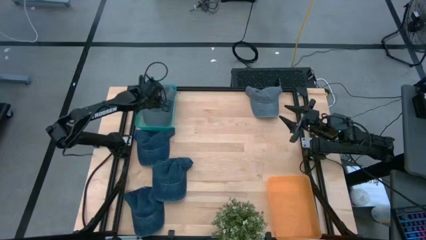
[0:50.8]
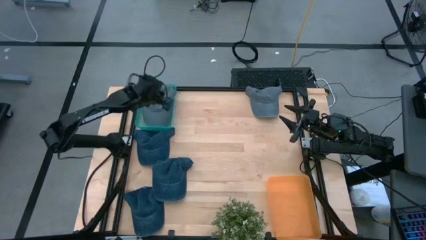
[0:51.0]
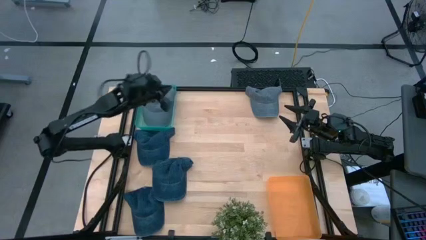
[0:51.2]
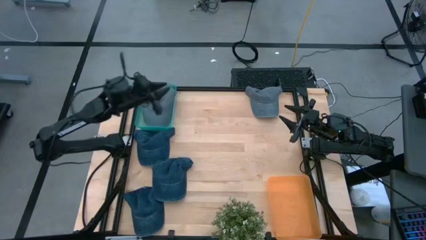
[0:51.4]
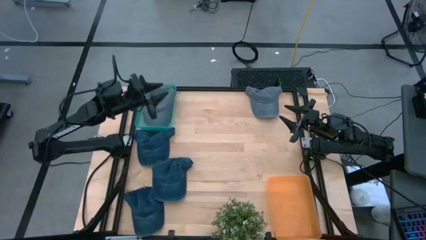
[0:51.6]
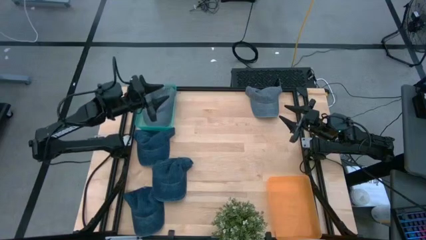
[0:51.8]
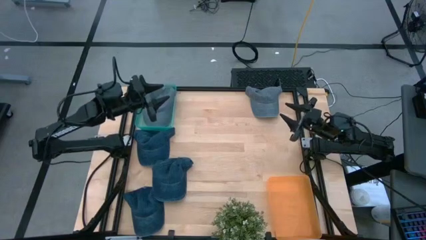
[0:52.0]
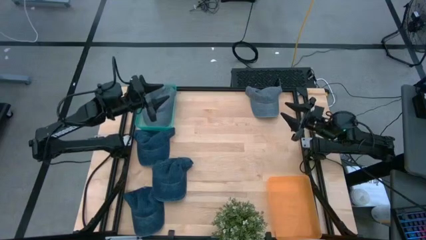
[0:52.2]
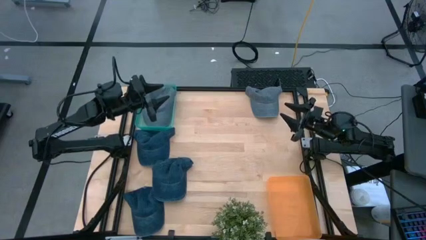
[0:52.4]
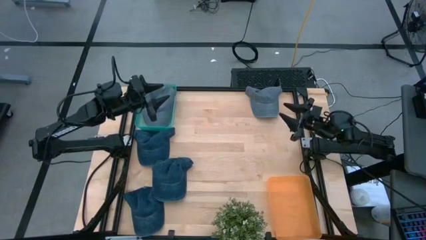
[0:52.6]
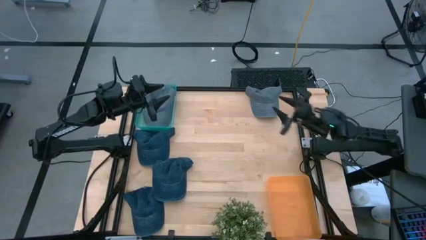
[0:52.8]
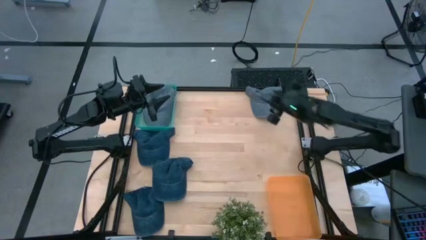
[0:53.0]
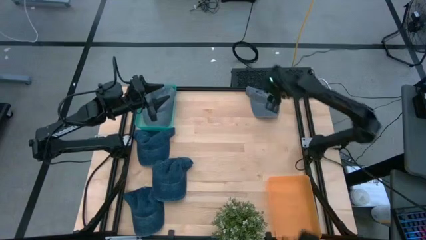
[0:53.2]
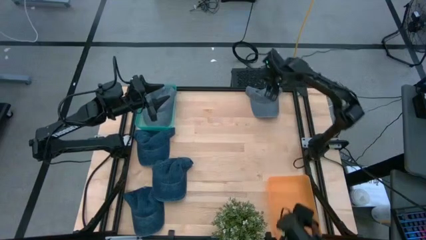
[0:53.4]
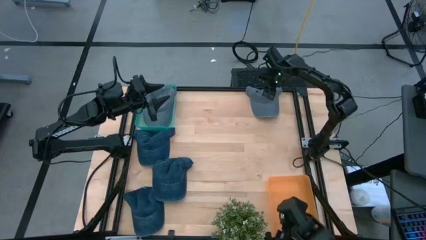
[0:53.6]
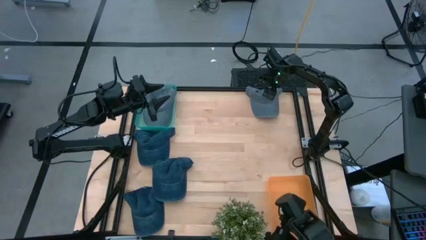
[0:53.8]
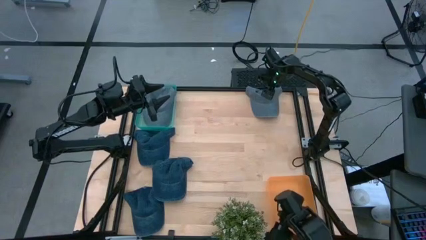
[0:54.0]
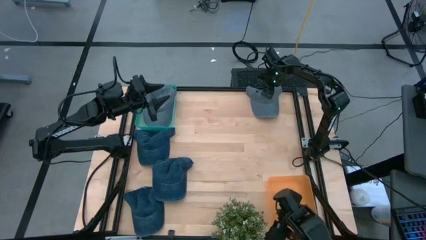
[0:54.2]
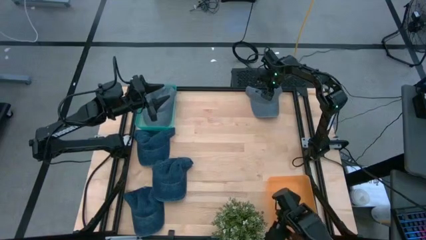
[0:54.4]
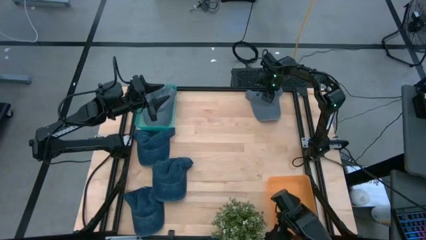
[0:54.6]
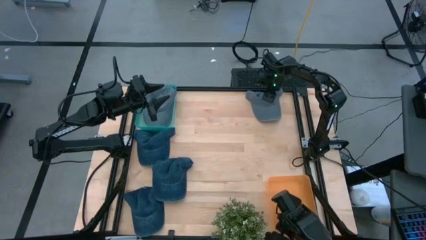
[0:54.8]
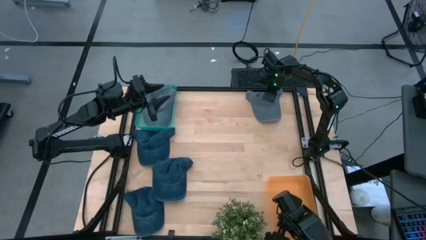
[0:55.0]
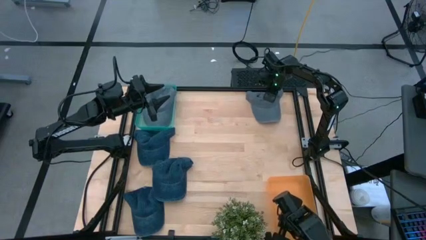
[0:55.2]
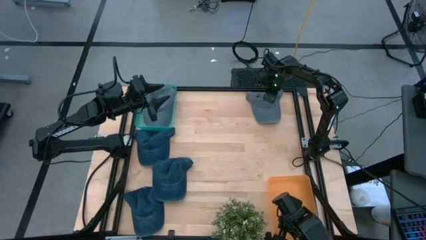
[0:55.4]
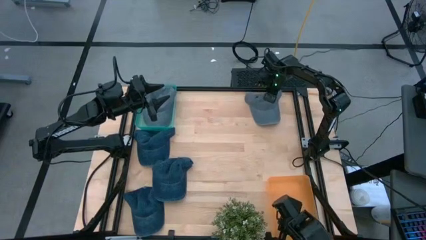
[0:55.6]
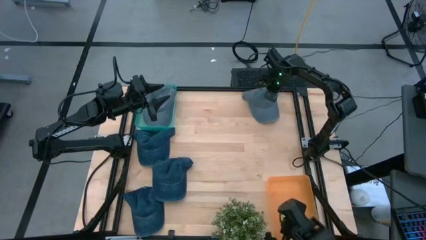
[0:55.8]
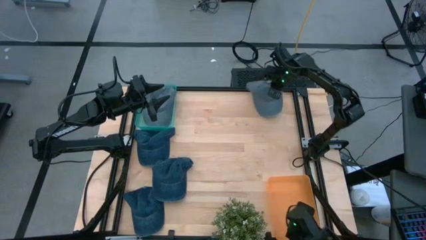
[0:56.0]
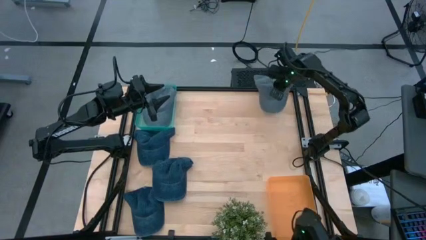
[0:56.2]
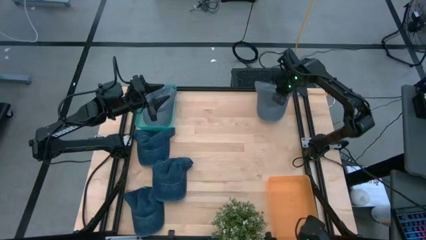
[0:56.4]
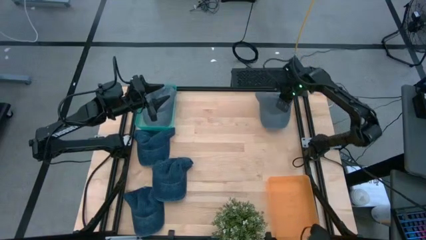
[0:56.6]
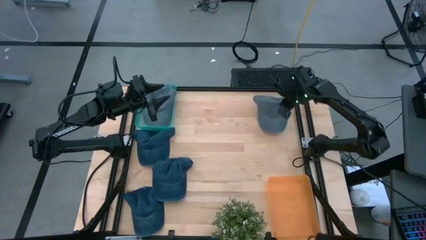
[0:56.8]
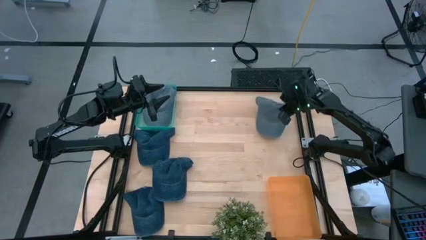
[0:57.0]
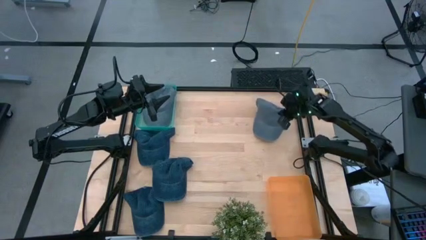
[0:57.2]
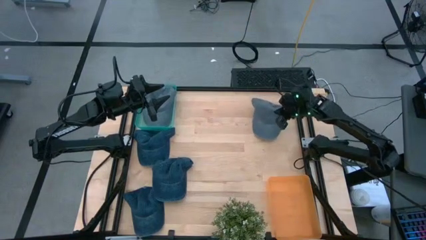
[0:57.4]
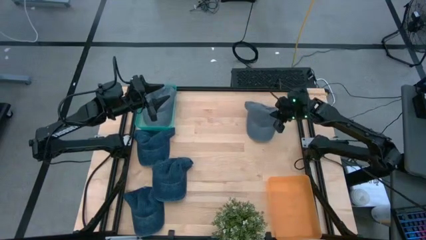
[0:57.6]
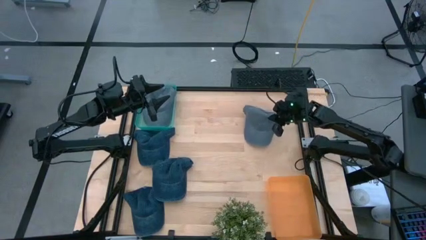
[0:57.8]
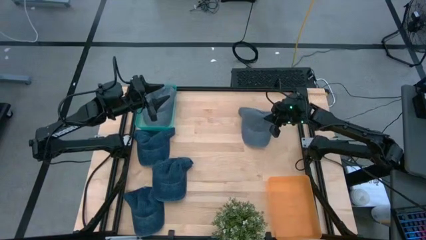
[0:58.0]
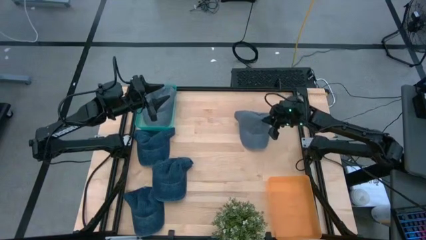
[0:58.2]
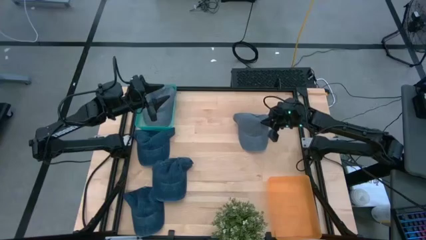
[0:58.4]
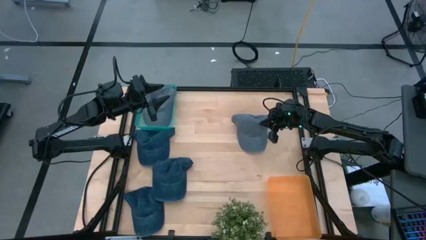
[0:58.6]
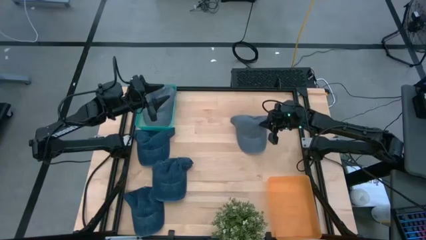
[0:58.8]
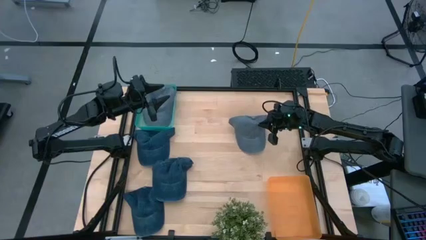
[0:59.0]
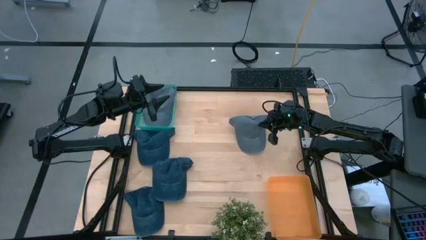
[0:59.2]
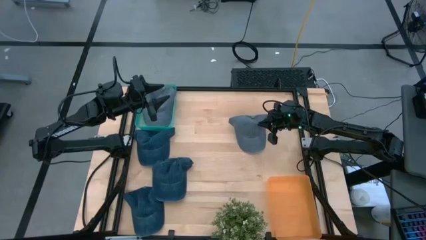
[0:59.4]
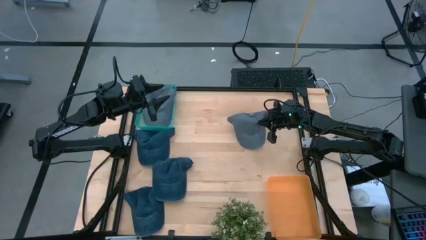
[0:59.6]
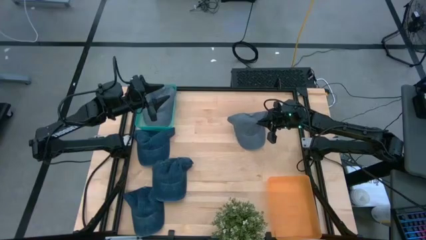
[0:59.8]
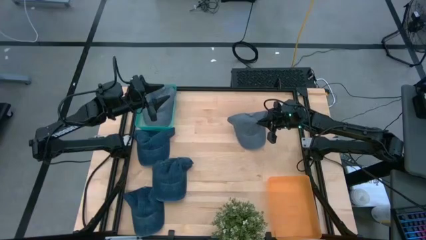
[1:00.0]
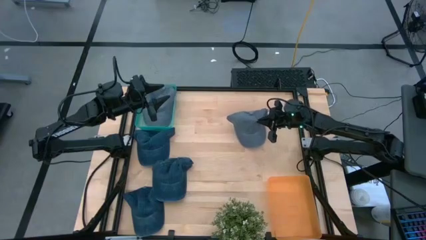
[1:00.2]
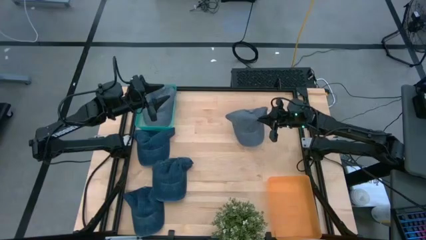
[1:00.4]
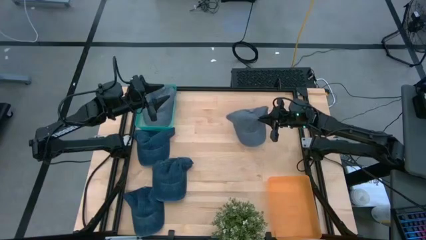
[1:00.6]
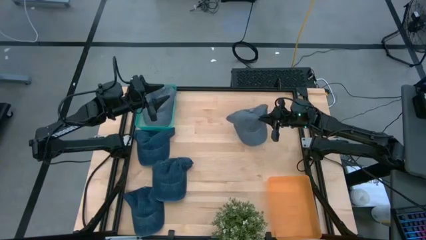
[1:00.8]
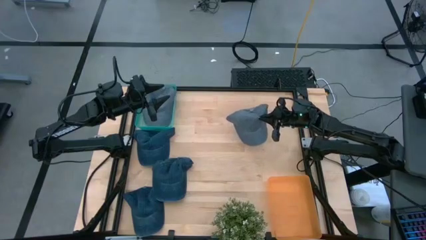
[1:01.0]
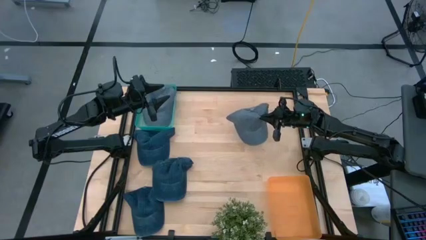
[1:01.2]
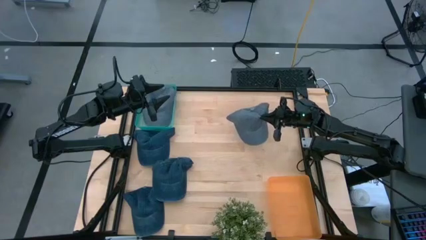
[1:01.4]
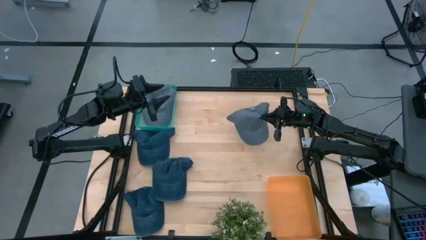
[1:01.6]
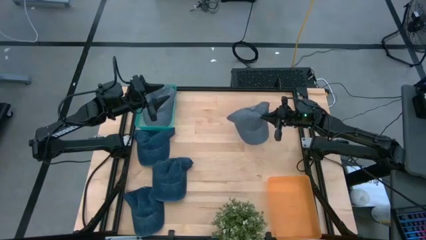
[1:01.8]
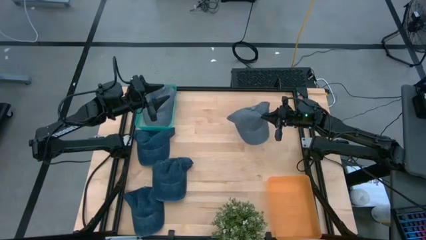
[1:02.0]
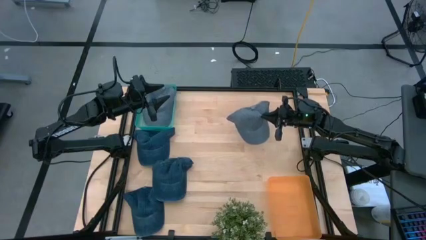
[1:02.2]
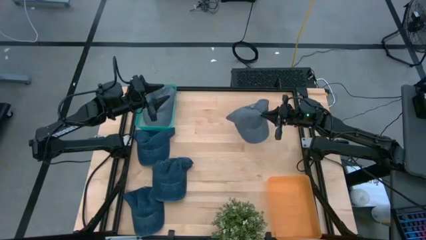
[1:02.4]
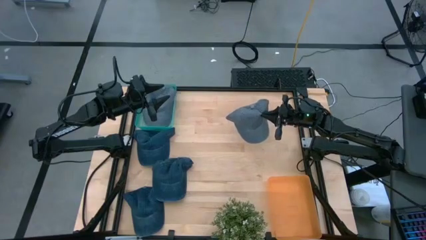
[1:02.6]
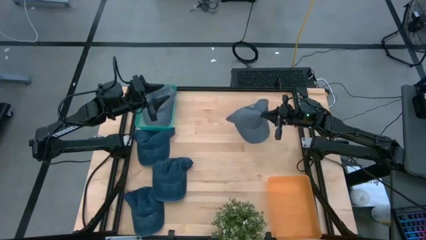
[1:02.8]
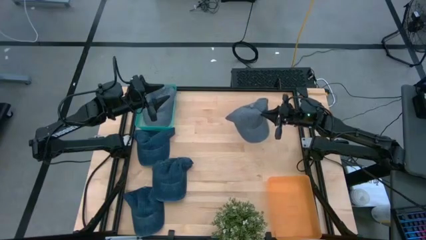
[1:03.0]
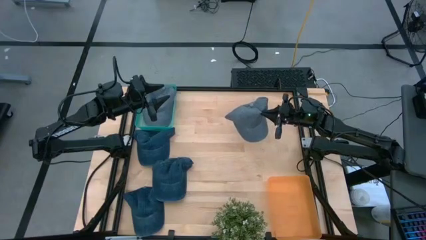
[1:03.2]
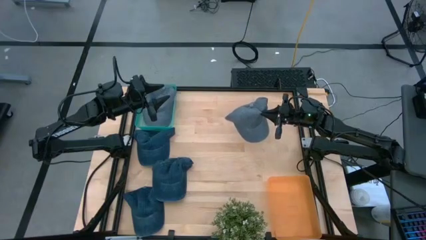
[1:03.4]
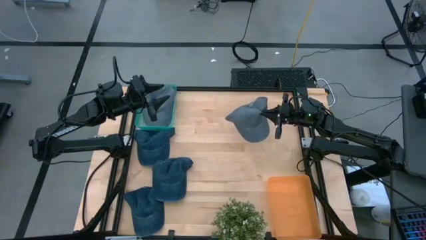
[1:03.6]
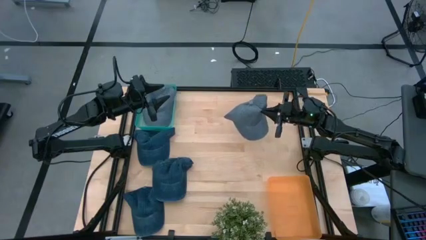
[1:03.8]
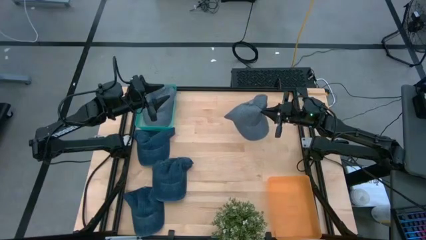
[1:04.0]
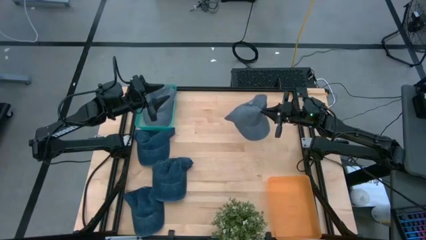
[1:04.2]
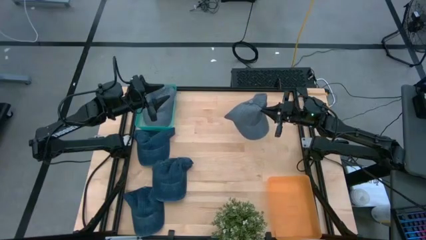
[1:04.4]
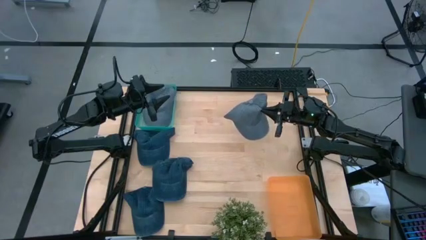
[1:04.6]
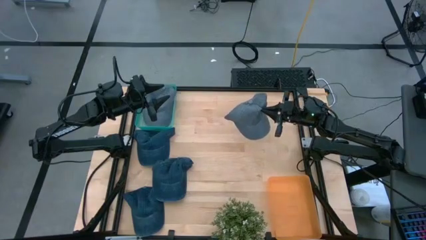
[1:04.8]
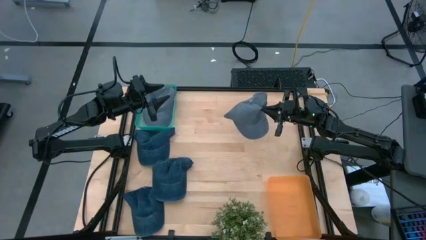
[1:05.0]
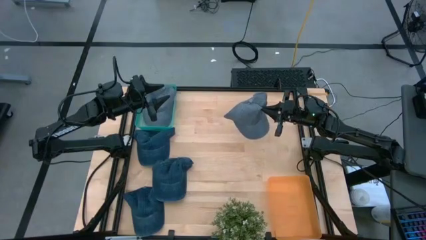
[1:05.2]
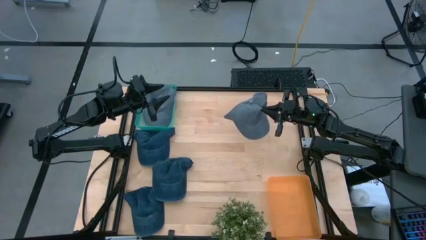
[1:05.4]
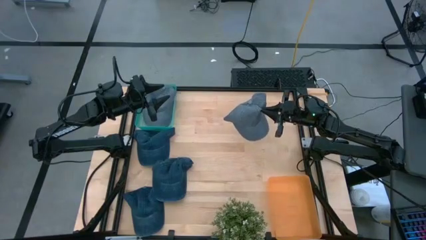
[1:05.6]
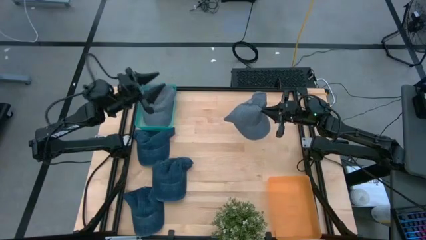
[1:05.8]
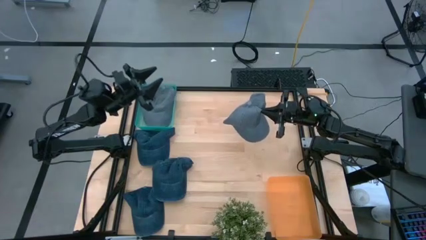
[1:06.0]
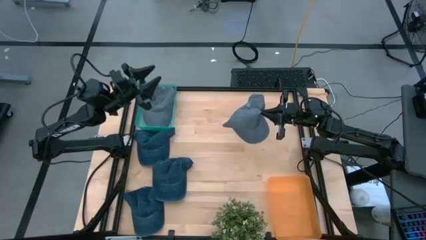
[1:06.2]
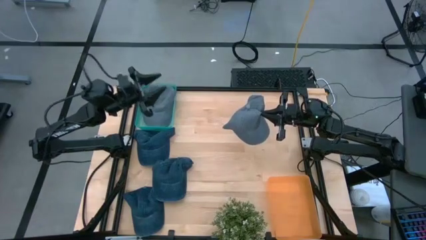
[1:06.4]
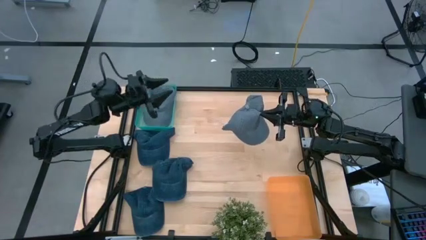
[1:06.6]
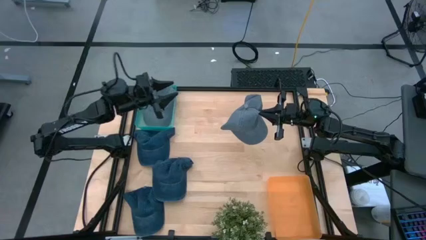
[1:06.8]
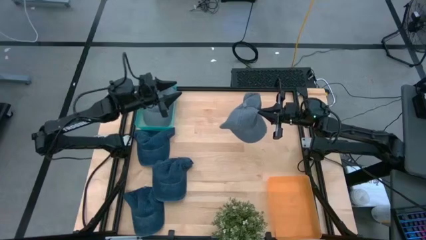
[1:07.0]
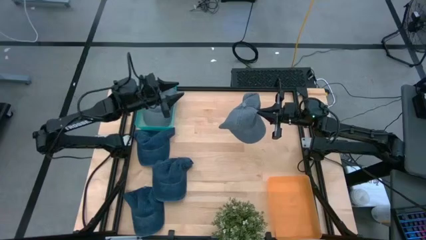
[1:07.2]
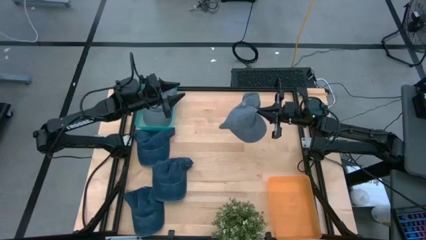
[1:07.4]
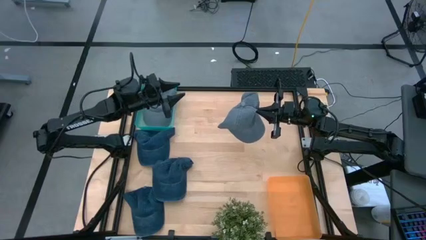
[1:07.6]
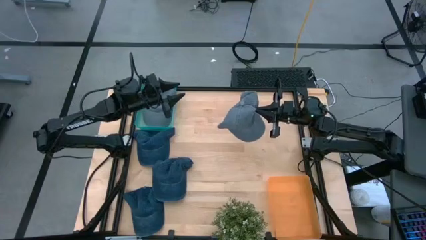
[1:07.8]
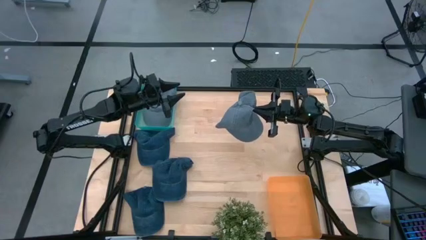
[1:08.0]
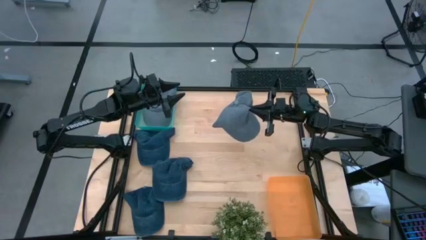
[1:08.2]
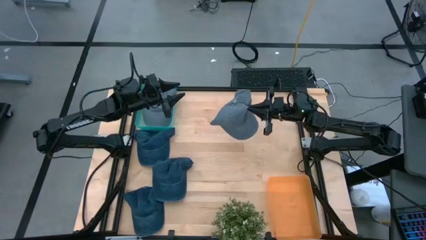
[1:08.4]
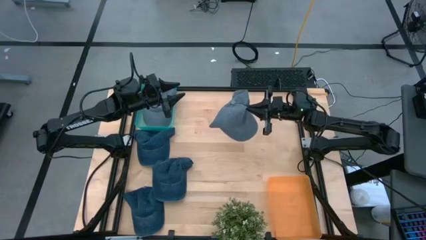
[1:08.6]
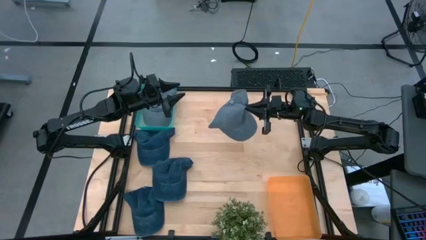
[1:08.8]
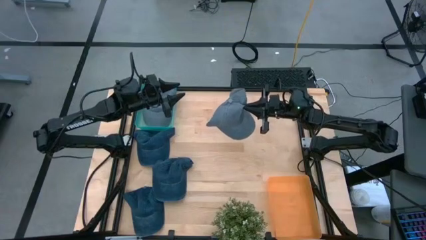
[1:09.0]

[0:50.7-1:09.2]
Task: Pick & Place hat
Put the gray cap into the green bin
